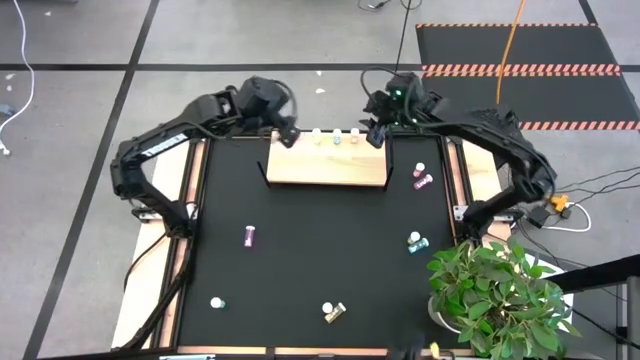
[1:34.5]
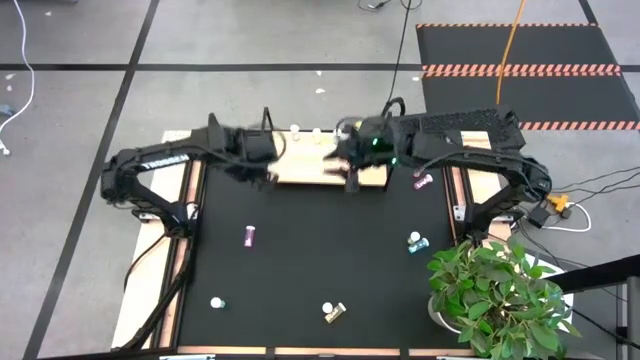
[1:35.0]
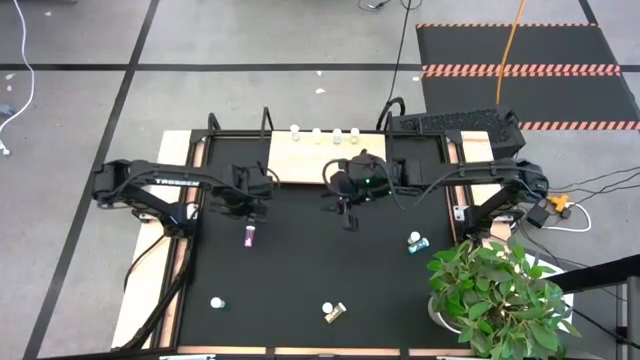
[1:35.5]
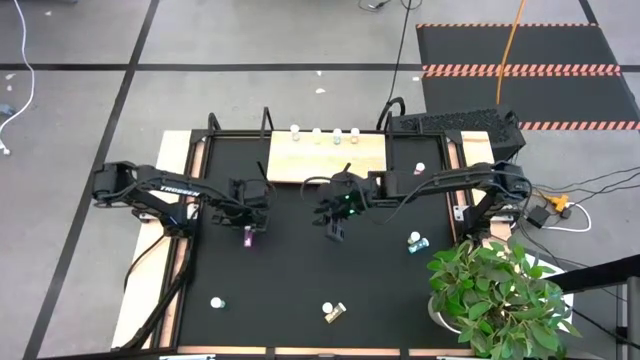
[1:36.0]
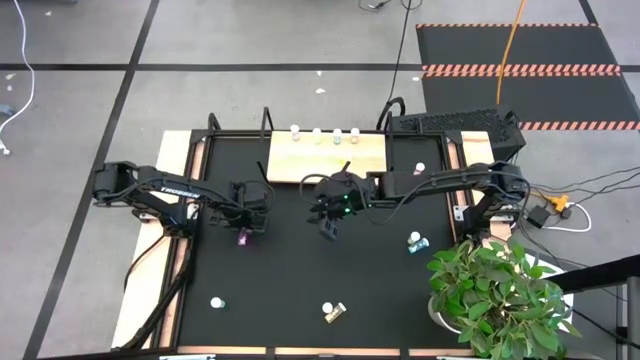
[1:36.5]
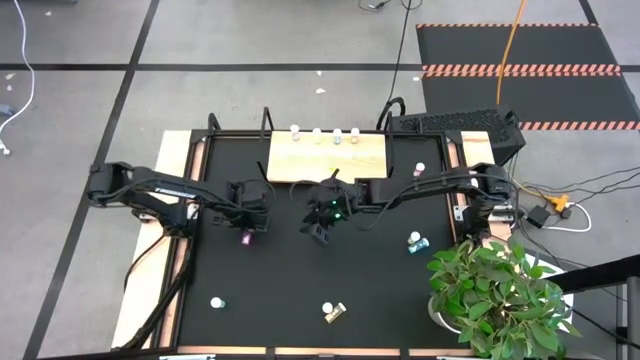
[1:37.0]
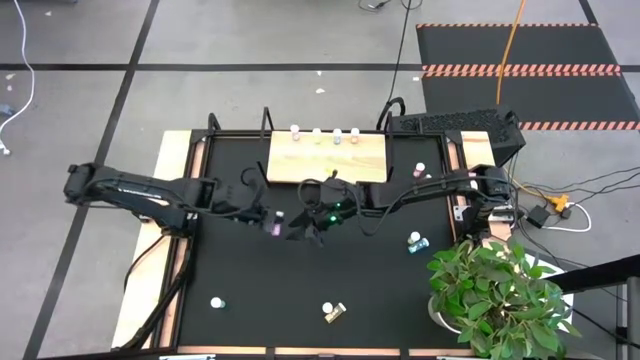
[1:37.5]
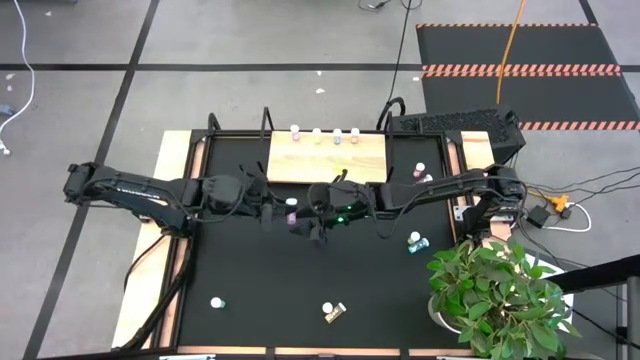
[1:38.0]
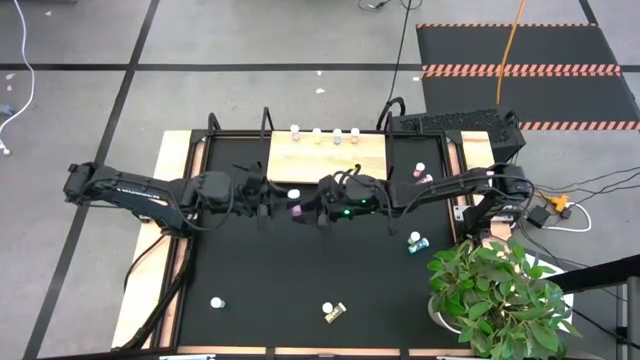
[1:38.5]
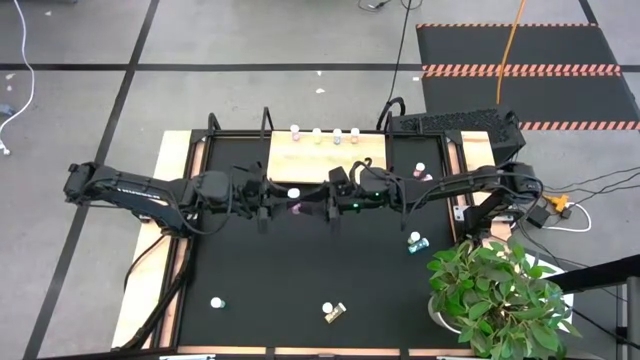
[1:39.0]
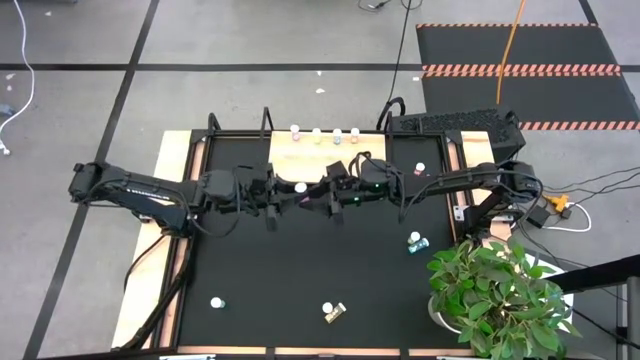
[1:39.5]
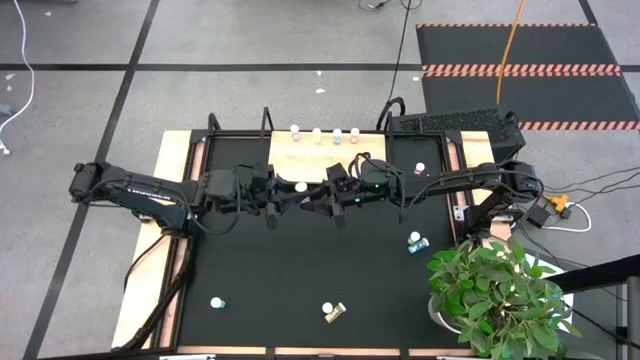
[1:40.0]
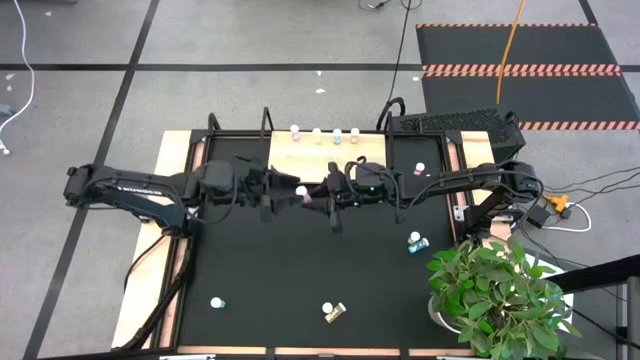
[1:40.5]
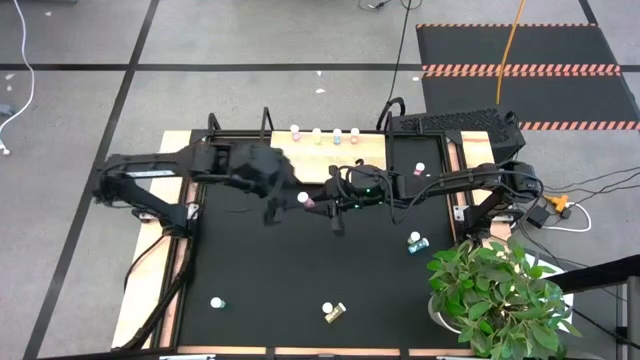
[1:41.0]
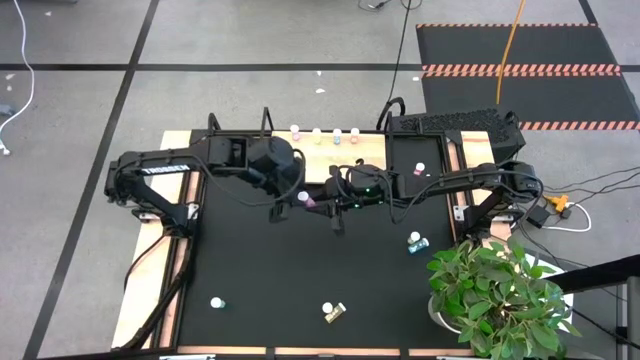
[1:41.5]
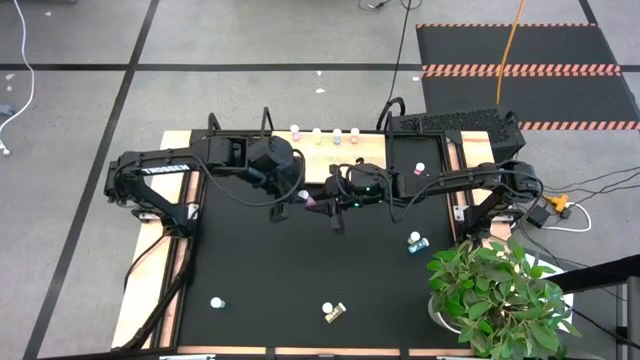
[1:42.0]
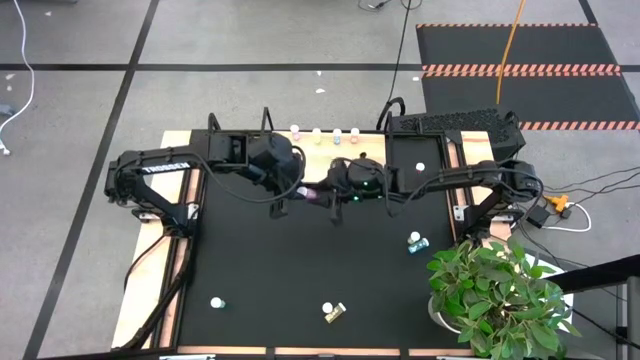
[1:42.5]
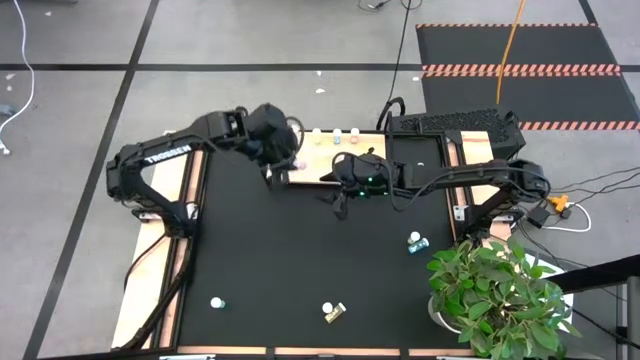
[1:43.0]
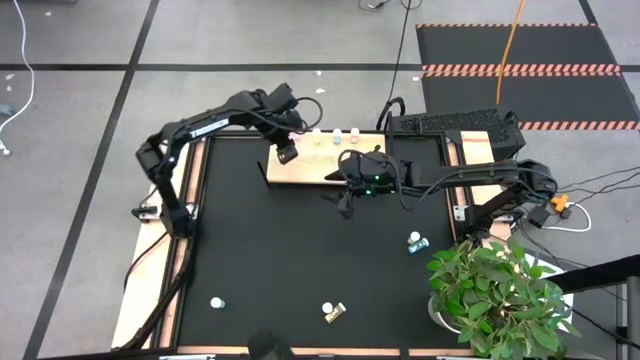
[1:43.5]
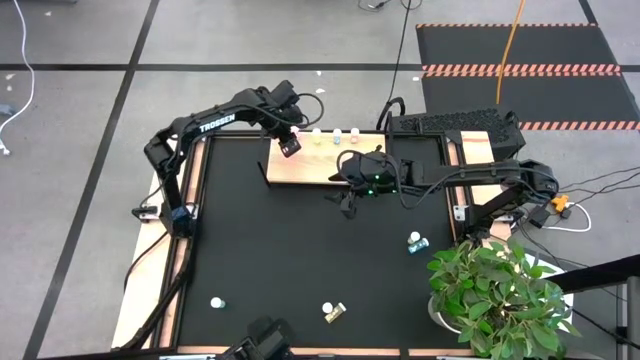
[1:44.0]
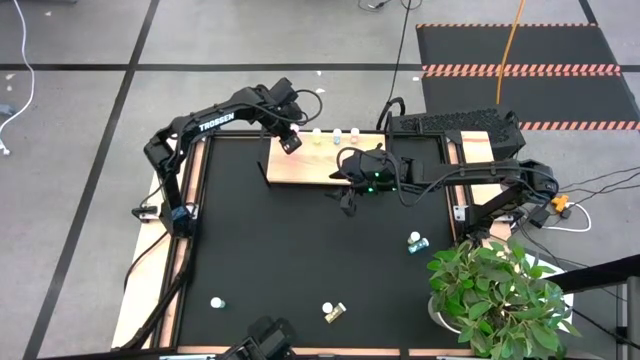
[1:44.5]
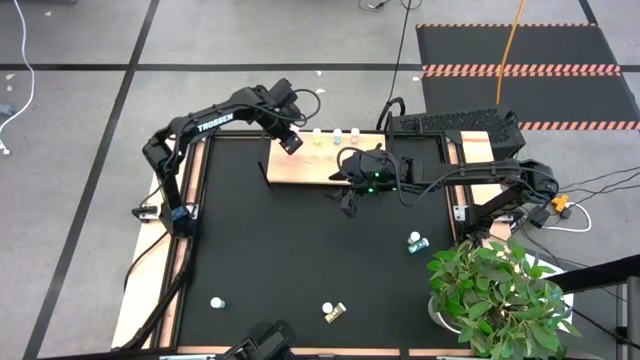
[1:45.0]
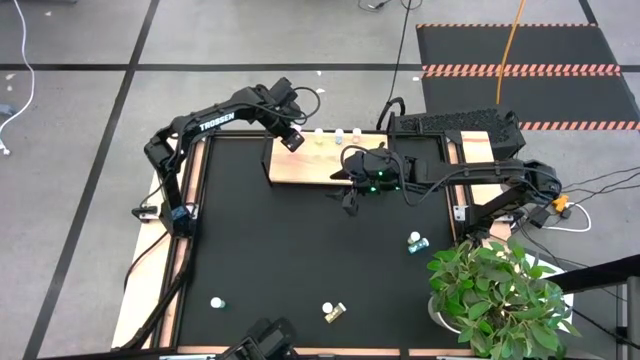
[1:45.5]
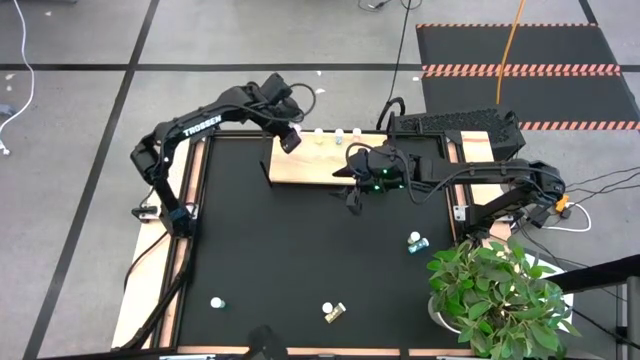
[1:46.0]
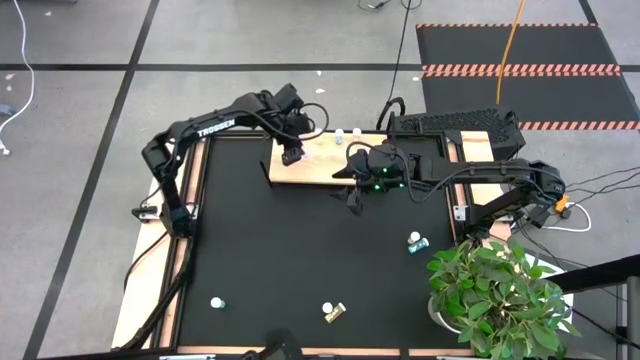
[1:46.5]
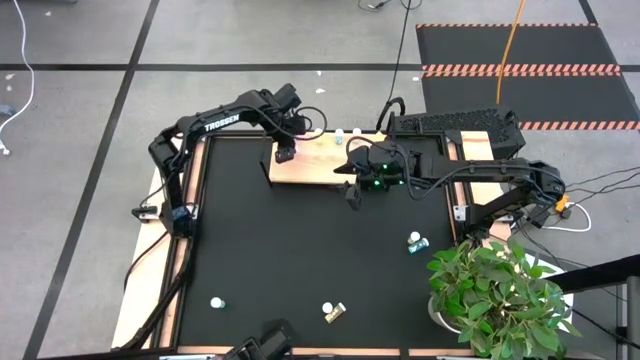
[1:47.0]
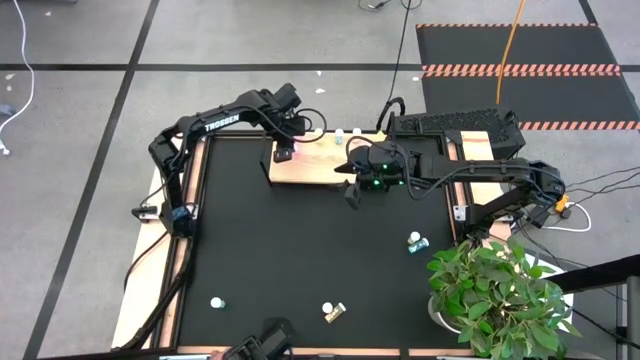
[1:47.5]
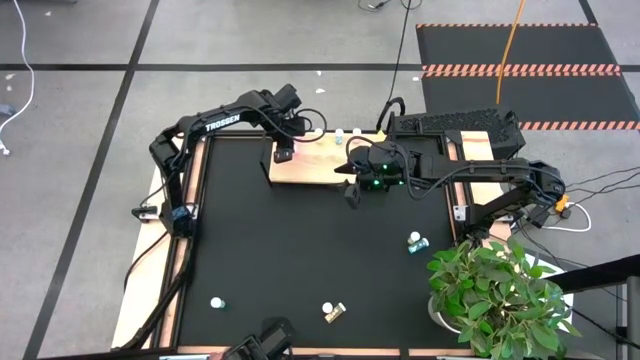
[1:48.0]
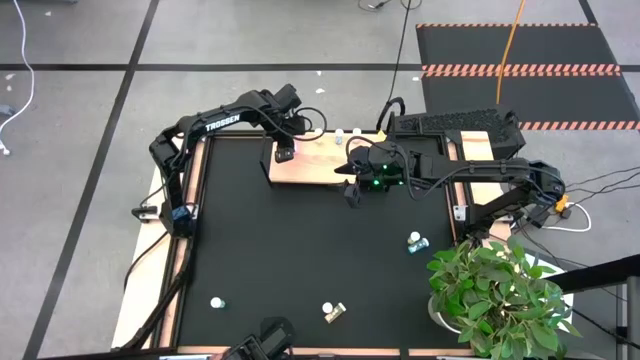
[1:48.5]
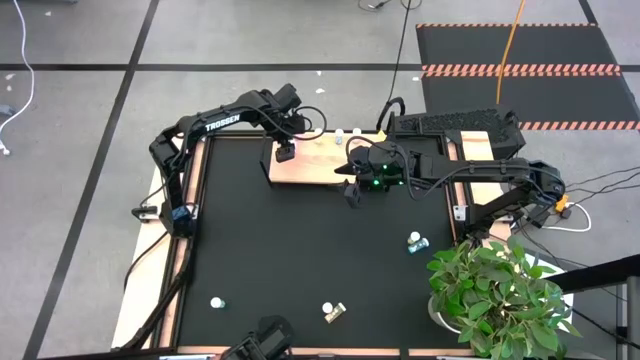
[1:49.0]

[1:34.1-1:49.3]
Task: Pick and place medicine bottles onto shelf by color
Put the bottom pink pill bottle on the shelf aligned with the other pink pill bottle

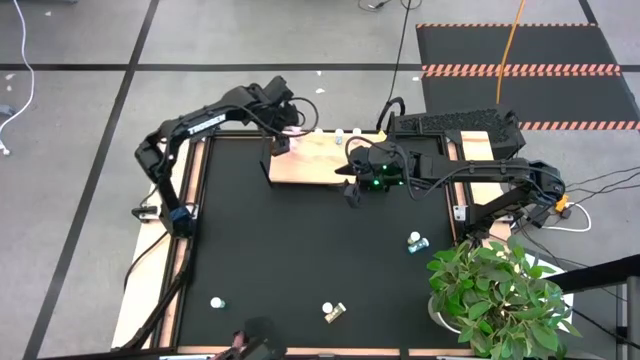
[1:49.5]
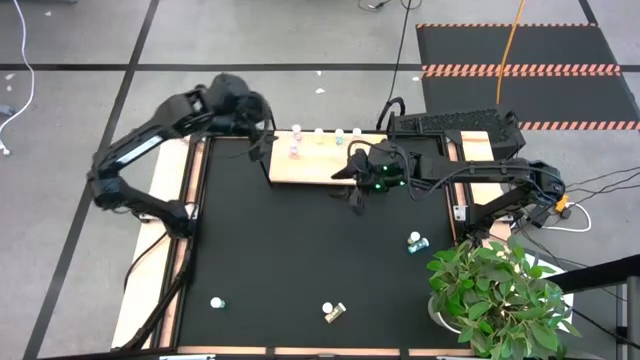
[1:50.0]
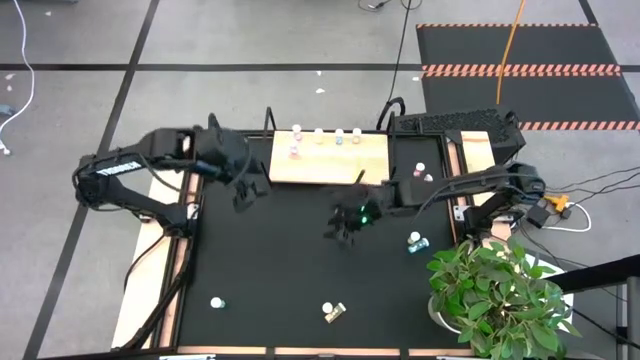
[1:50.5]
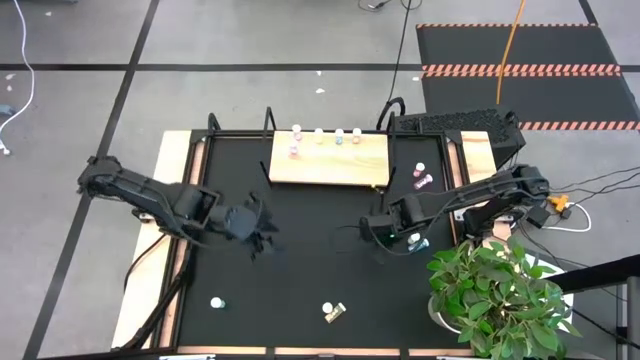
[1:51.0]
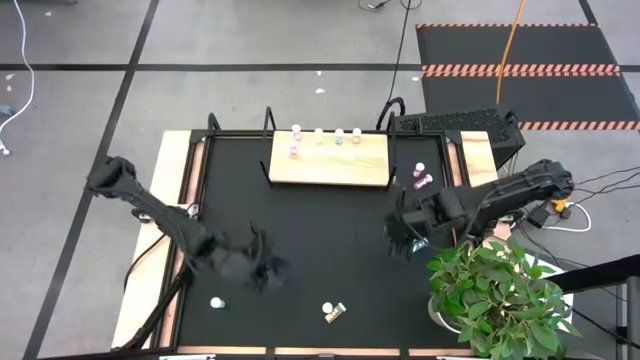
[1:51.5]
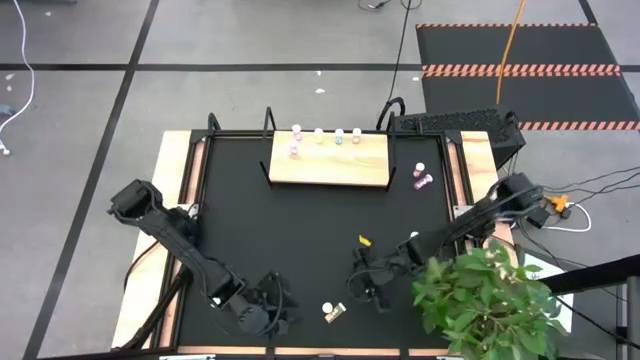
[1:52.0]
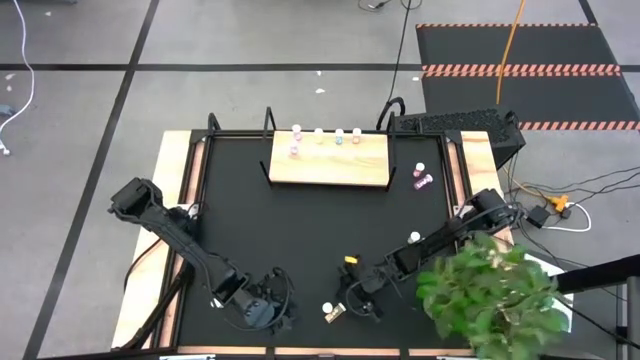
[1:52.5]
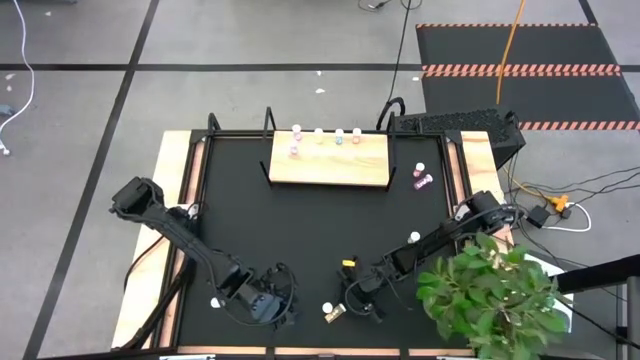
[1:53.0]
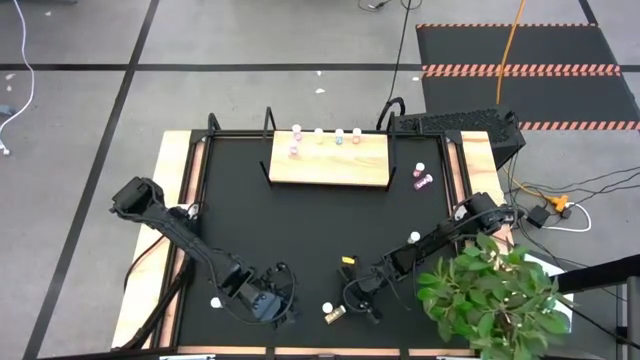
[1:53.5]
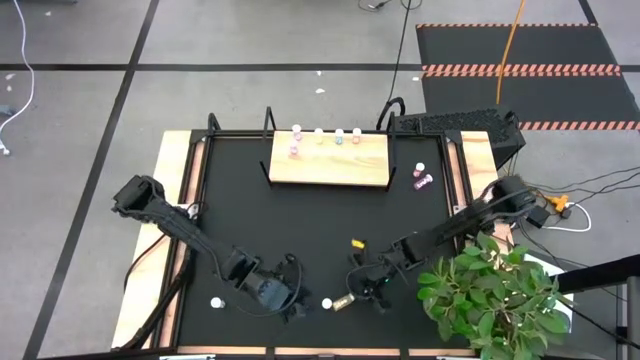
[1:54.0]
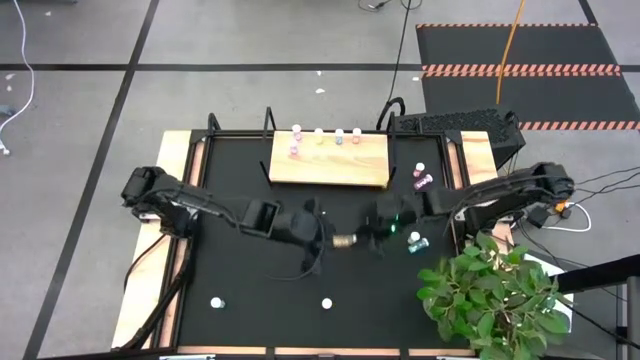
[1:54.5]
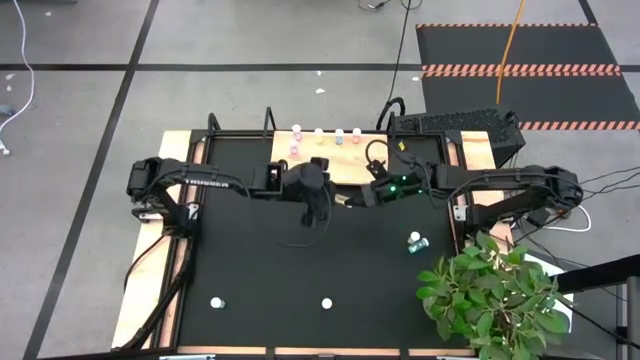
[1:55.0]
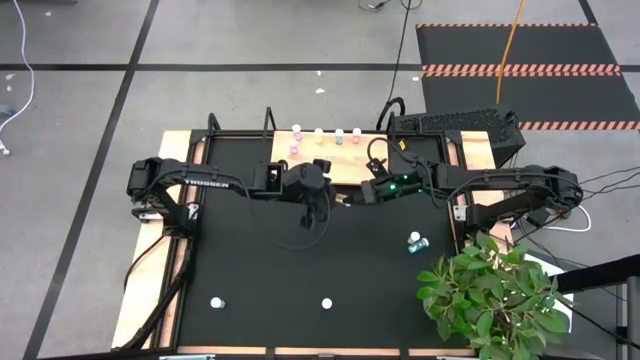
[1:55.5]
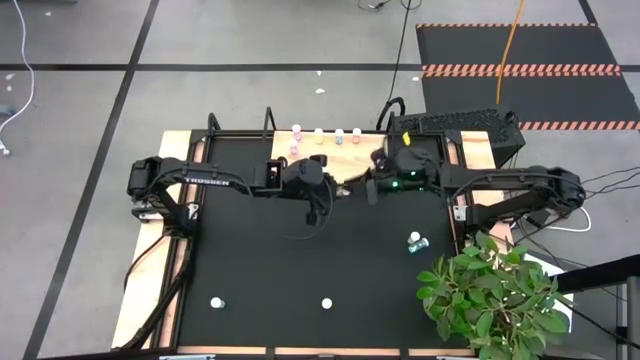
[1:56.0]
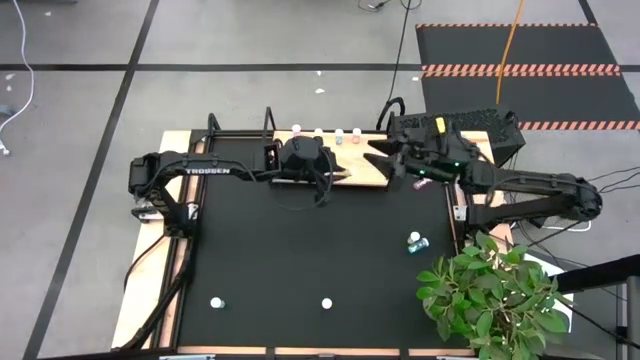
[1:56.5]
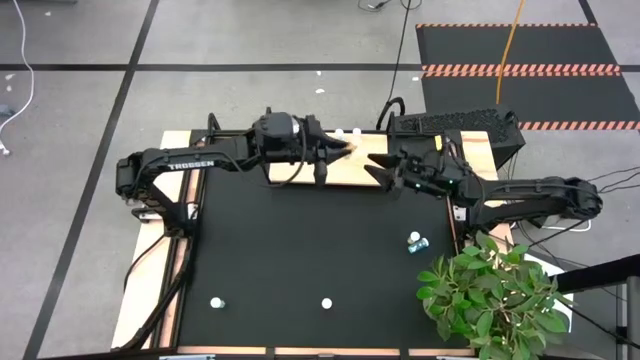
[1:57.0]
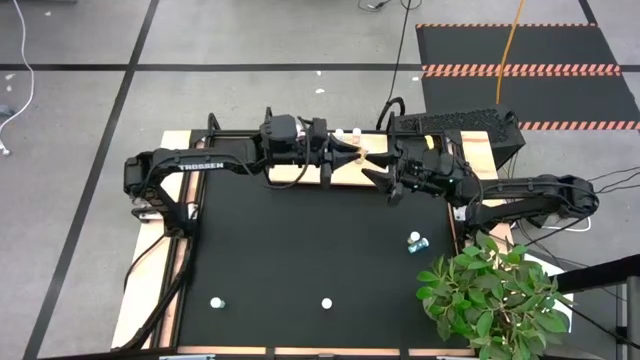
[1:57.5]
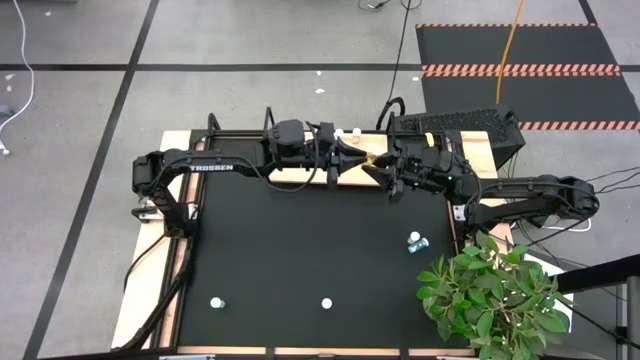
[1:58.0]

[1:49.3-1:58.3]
Put the bottom yellow pill bottle on the shelf aligned with the other yellow pill bottle
